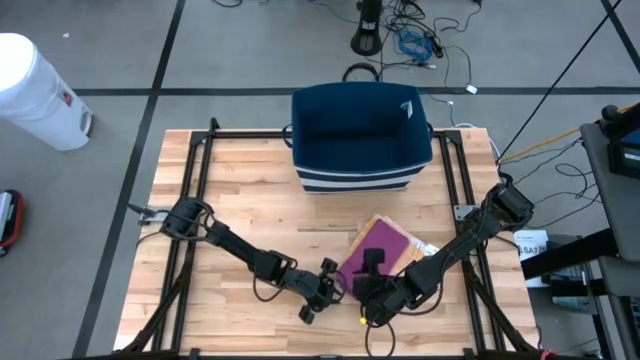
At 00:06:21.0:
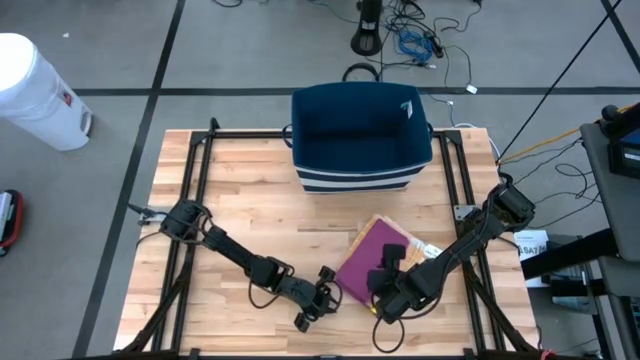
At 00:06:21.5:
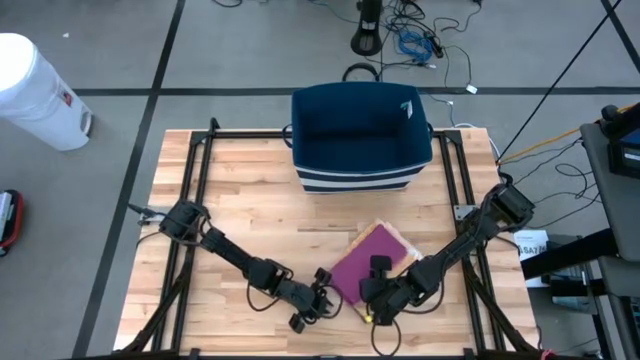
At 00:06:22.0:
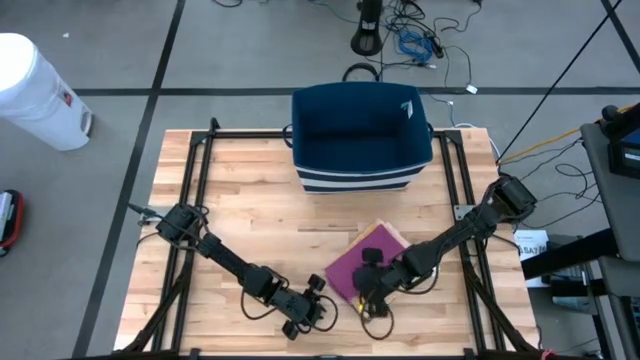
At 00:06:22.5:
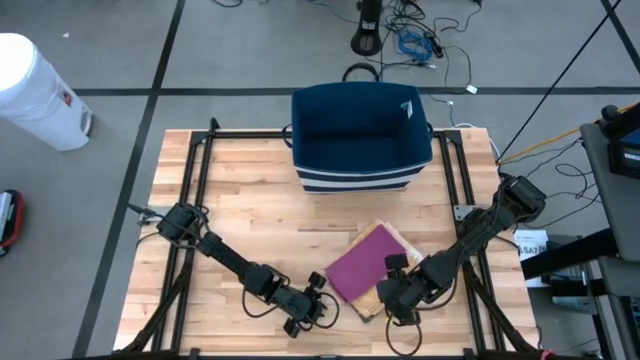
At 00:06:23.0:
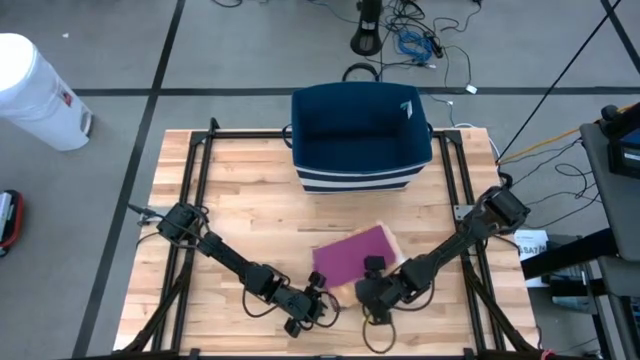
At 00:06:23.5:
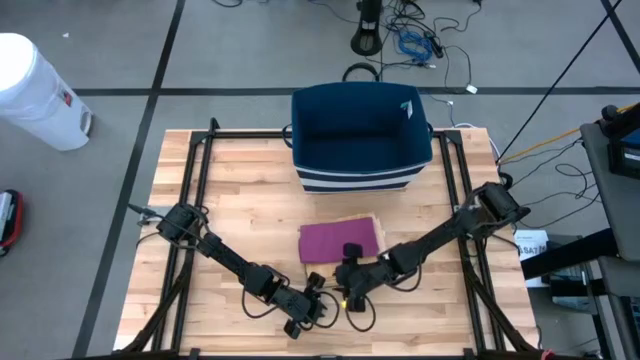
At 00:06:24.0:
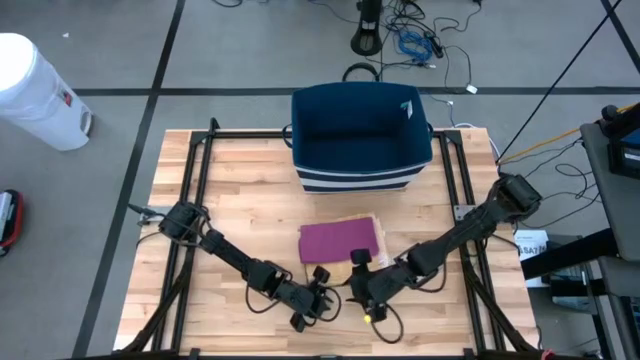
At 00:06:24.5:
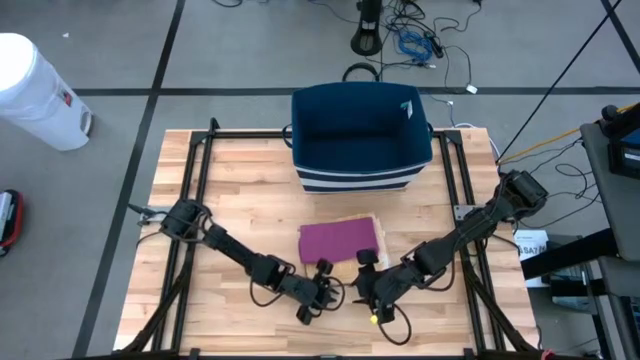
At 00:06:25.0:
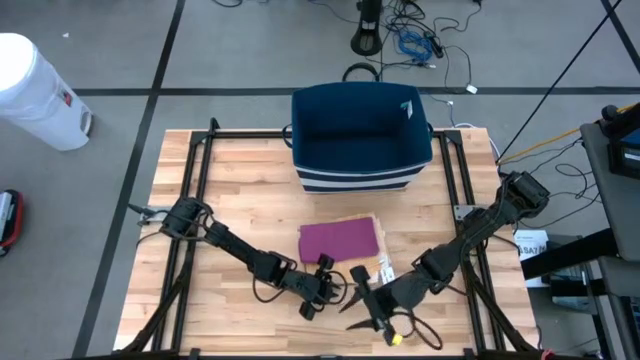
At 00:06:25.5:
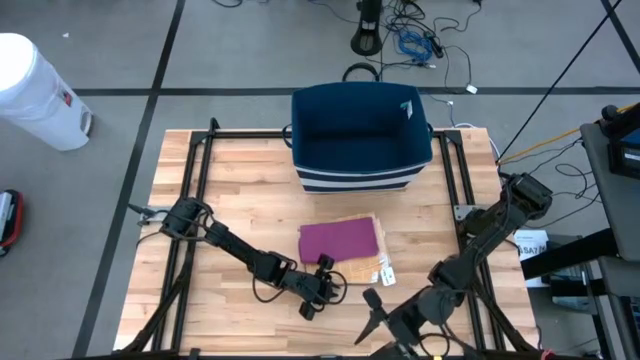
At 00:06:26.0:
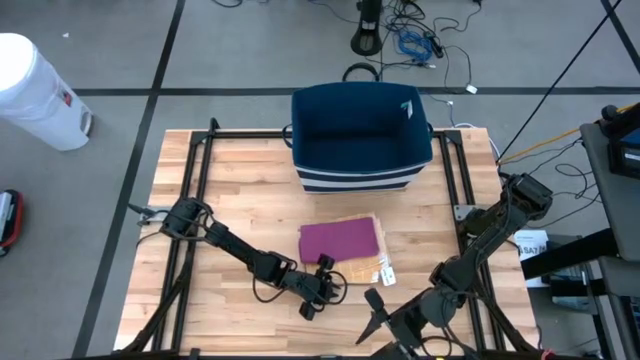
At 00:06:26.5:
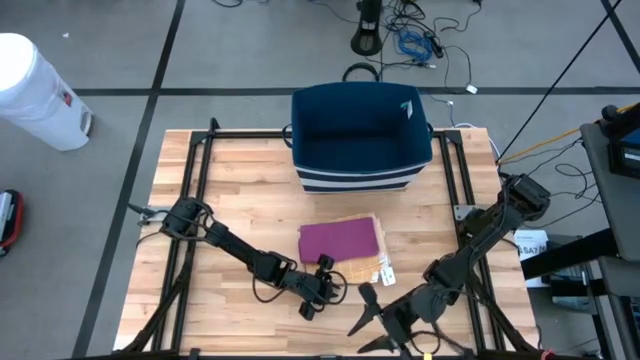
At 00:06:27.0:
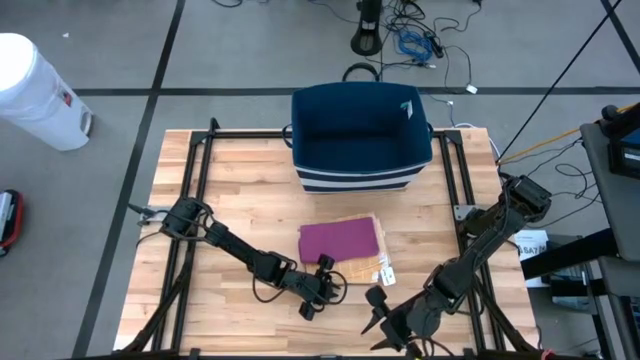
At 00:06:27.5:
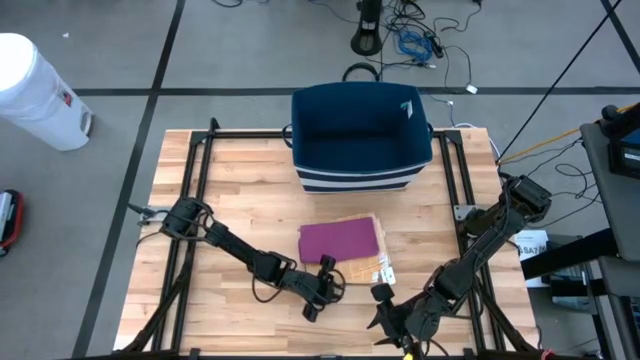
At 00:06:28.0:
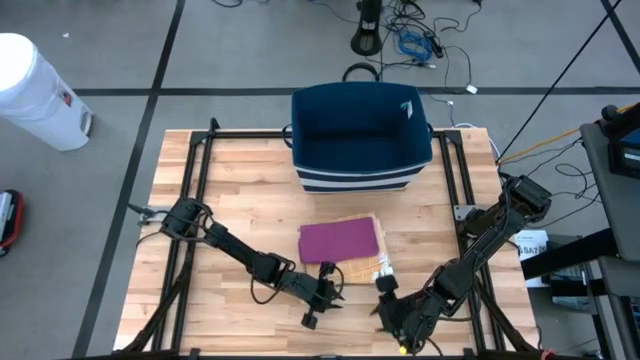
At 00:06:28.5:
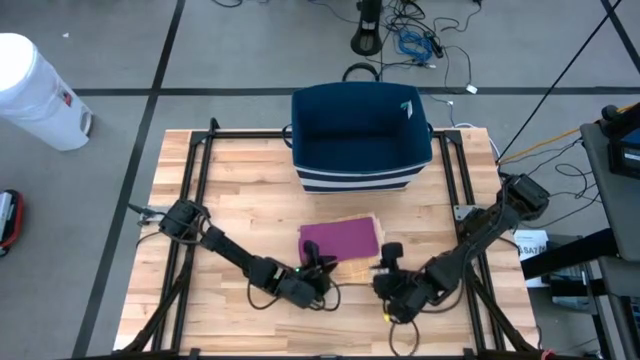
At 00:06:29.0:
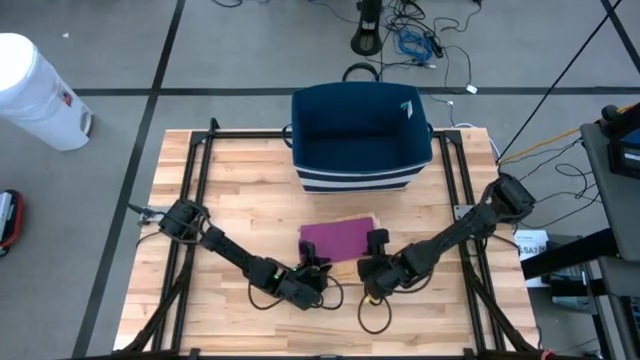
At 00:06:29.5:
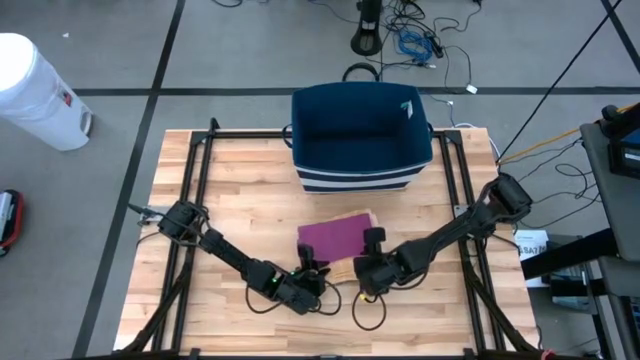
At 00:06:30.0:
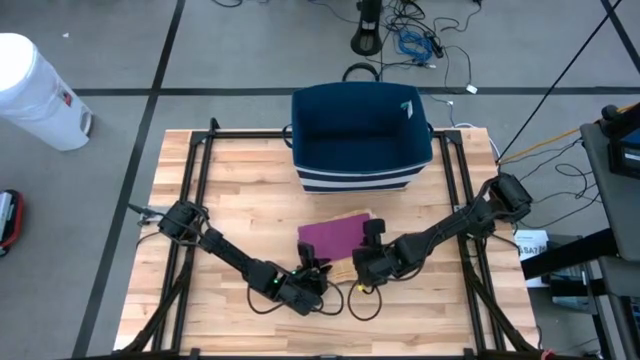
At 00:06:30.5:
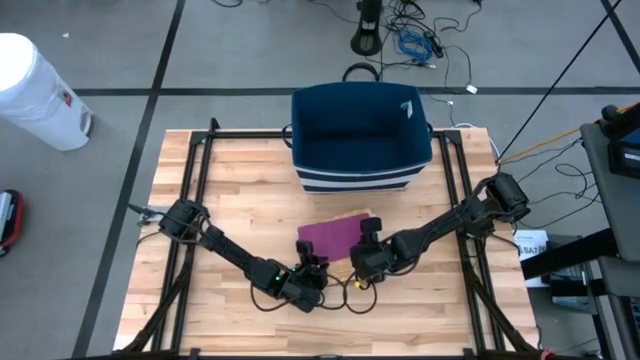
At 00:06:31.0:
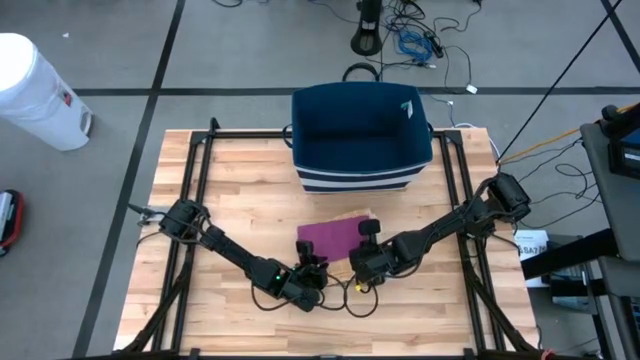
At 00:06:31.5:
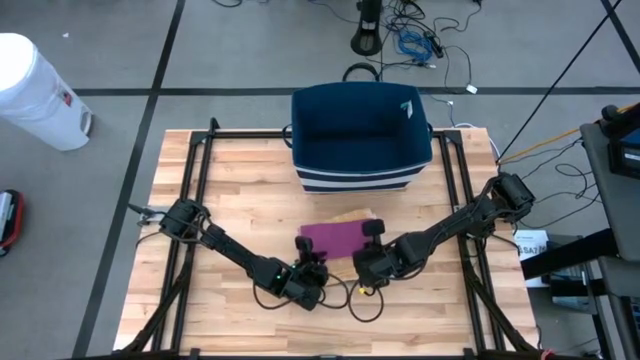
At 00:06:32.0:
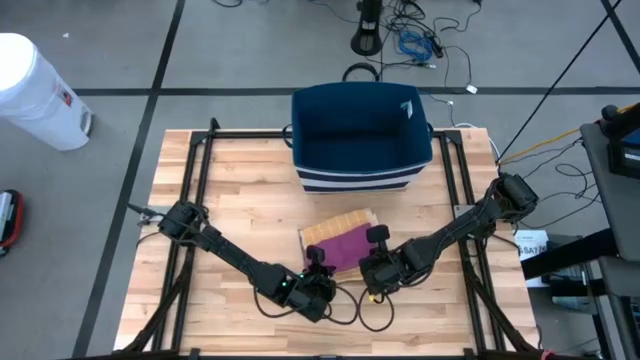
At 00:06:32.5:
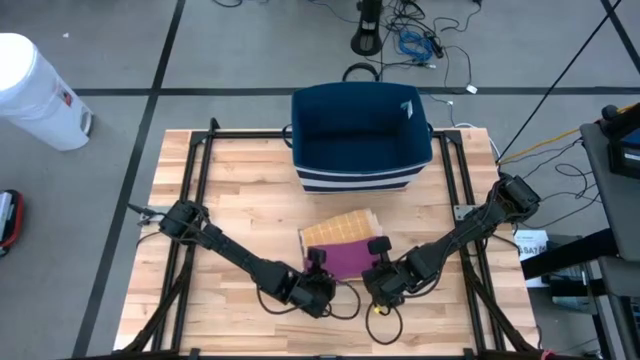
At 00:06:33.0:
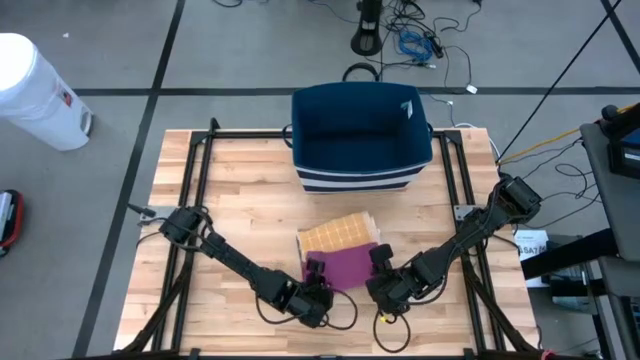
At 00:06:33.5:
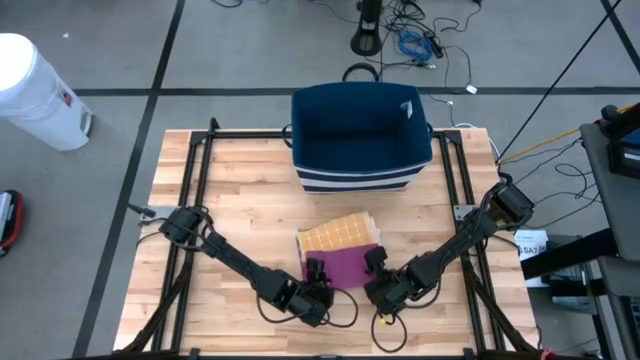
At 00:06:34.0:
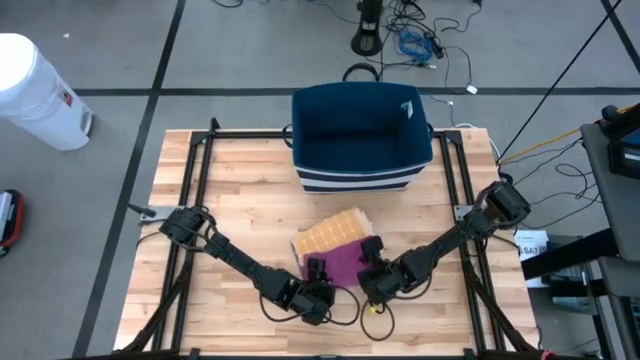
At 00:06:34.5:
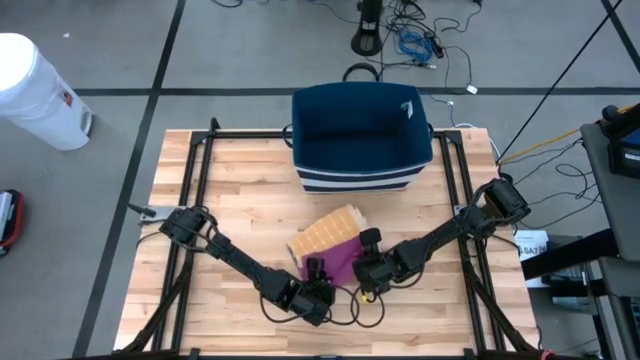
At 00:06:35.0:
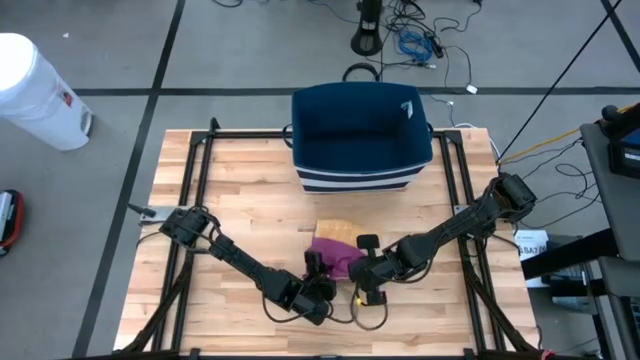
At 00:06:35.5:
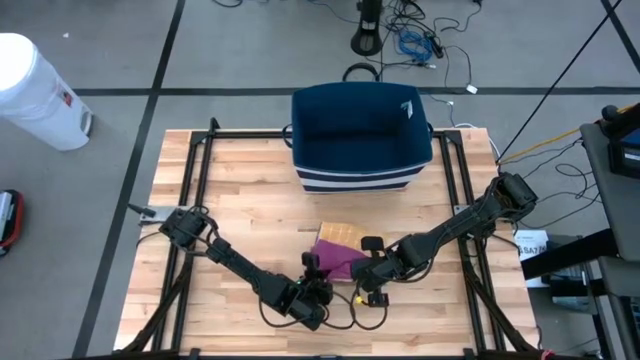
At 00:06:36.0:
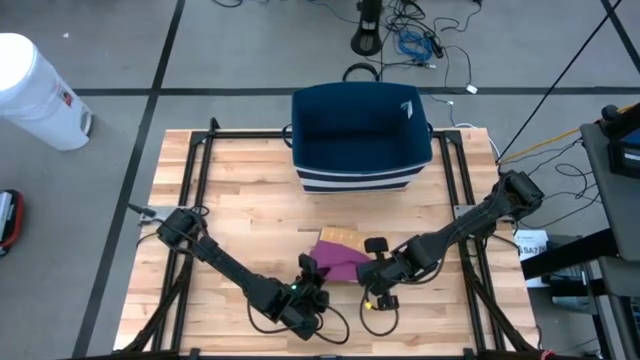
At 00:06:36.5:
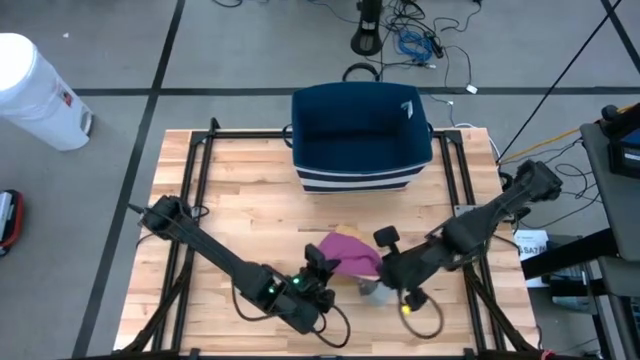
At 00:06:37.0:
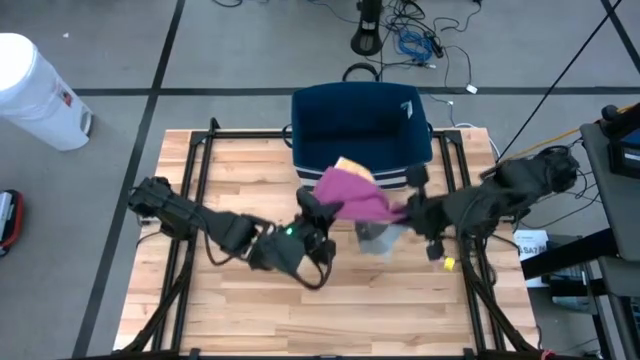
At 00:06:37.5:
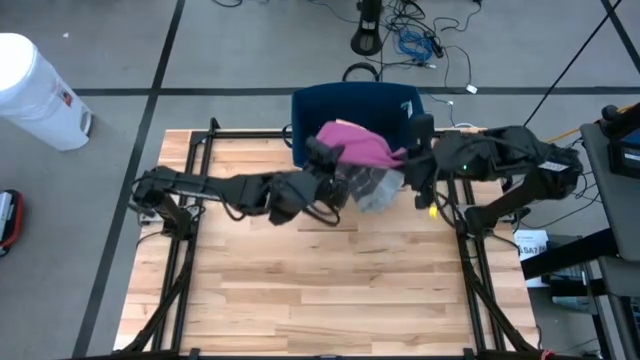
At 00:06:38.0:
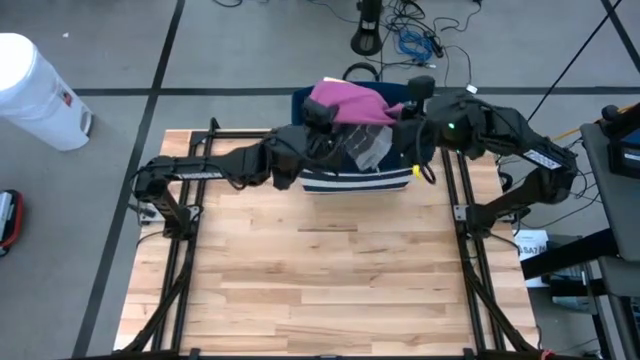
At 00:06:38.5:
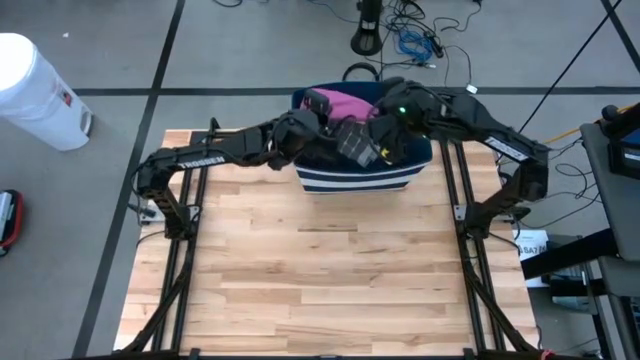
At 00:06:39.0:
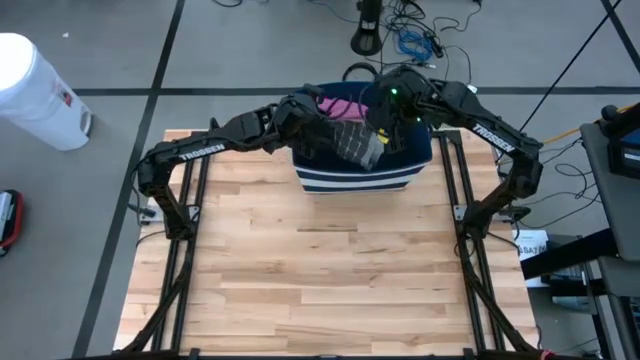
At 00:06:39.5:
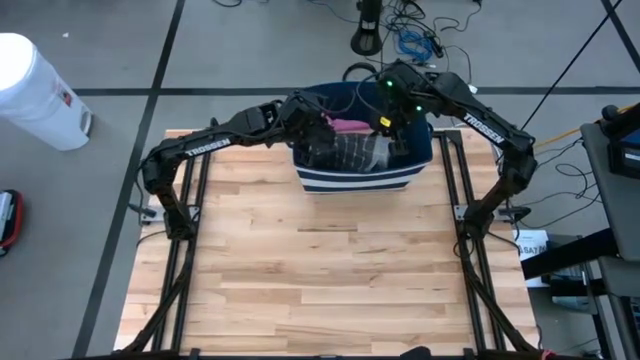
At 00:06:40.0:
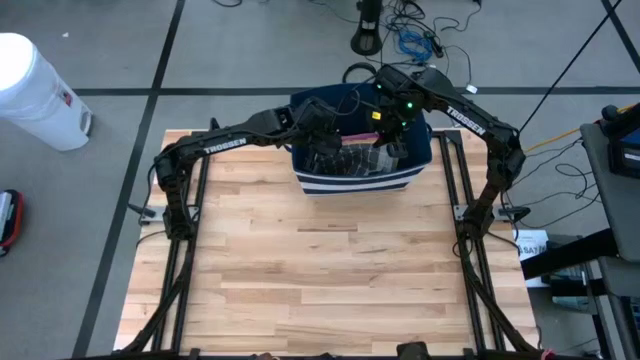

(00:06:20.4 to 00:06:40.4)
Task: Fold towel
Put the stack of towels into the blue bin
